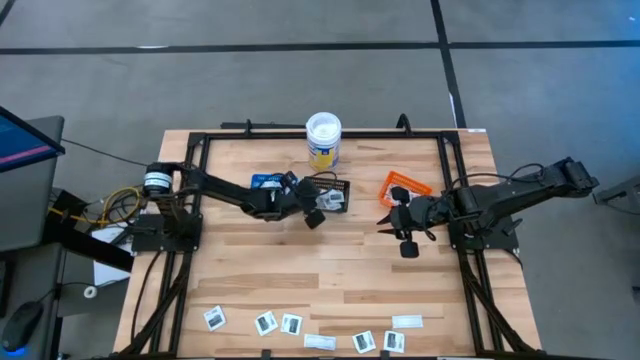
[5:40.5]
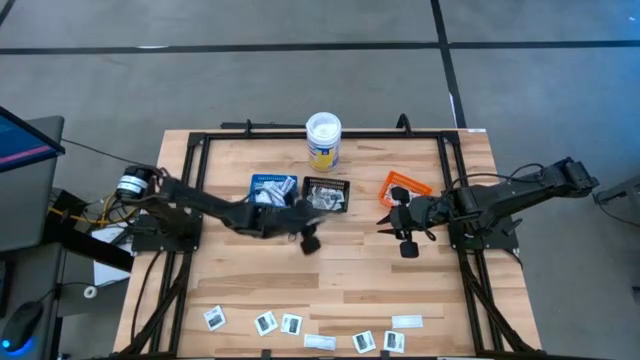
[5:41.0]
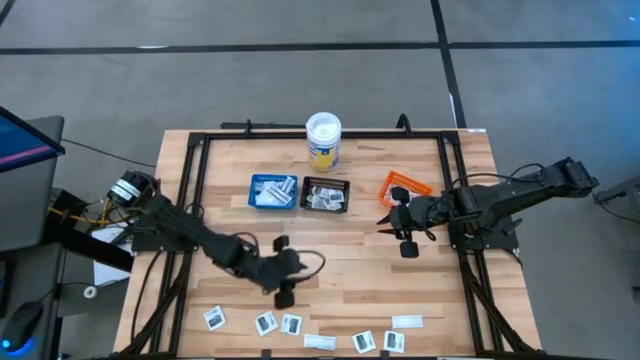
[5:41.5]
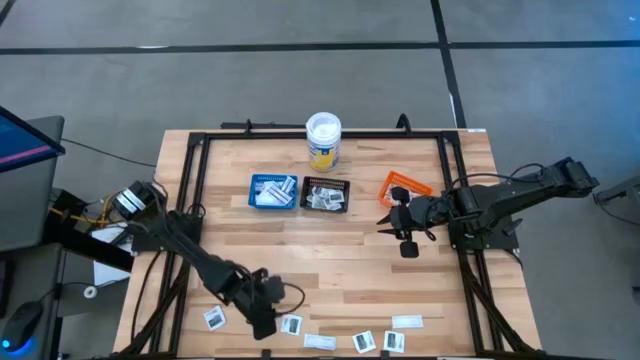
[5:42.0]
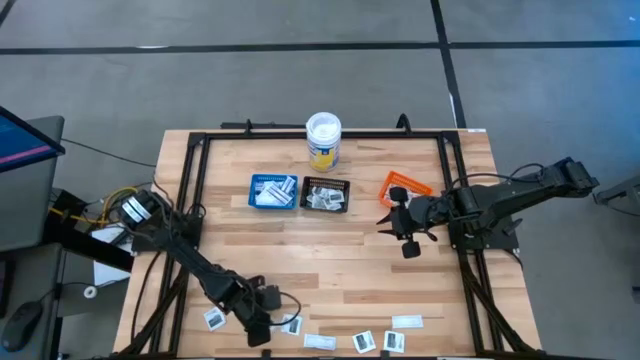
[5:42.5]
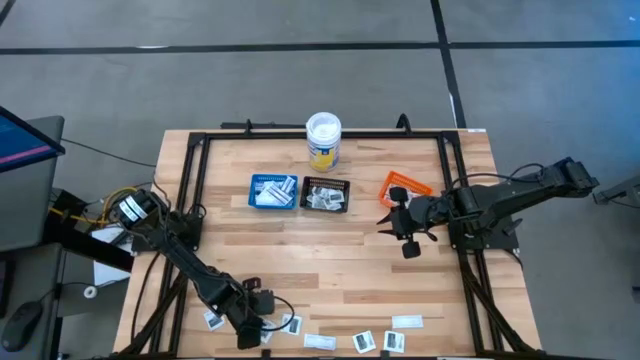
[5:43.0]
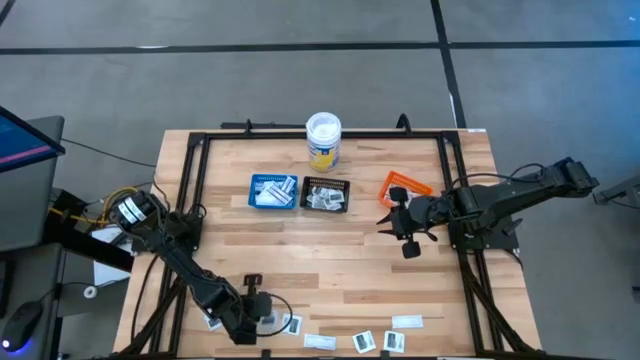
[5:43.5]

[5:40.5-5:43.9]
Task: Pick & Place First Aid Supplies
Put the black towelette pack into the black bin

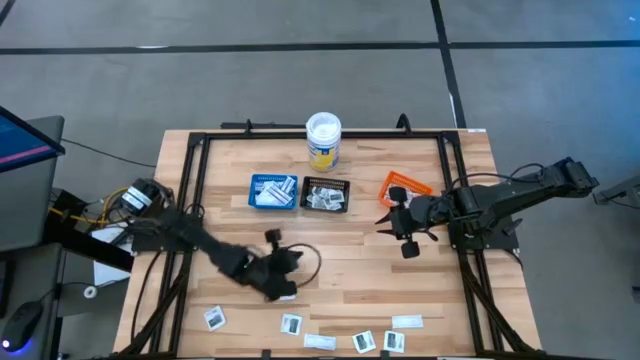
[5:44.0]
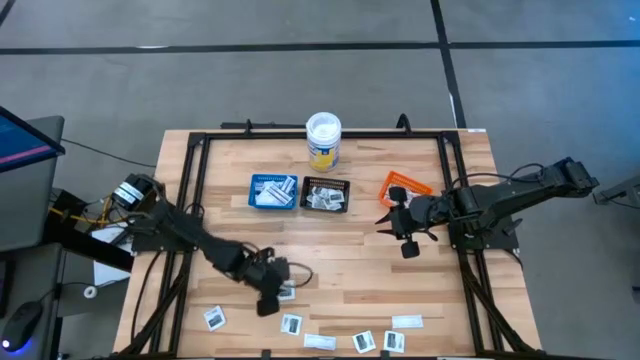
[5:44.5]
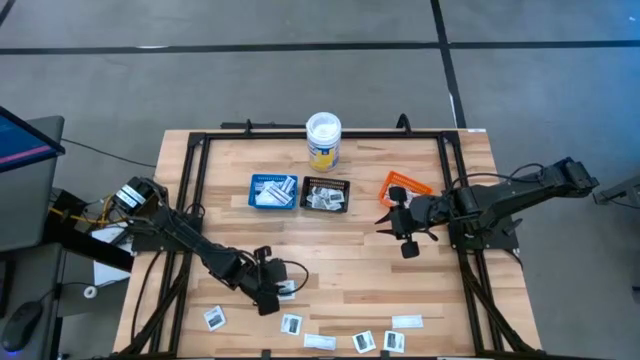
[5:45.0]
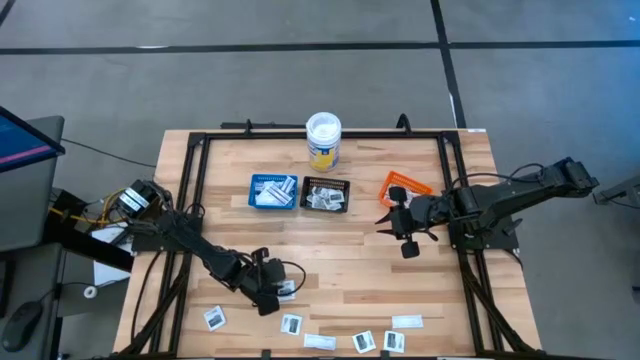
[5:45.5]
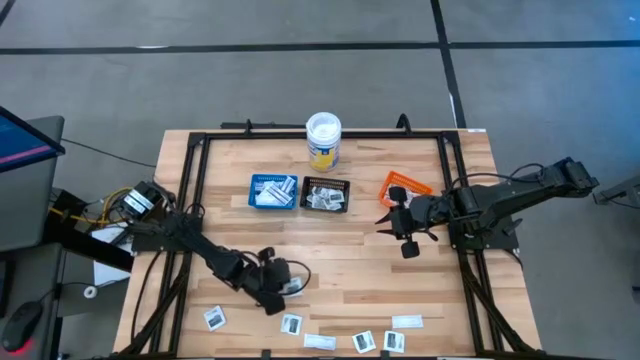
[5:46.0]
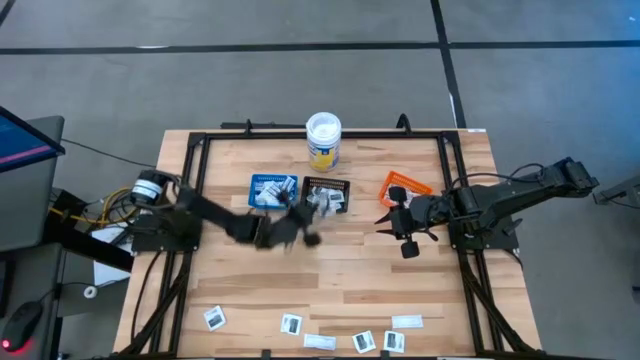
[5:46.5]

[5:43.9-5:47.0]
Put the black towelette pack into the black bin

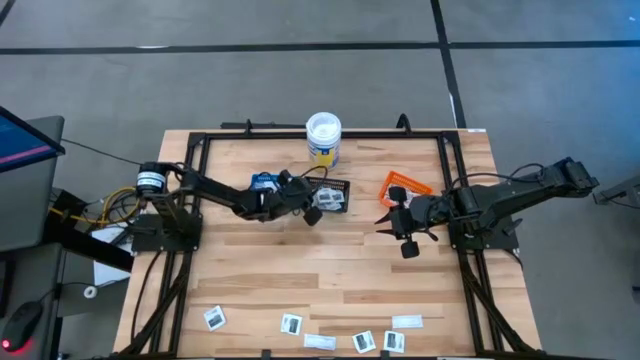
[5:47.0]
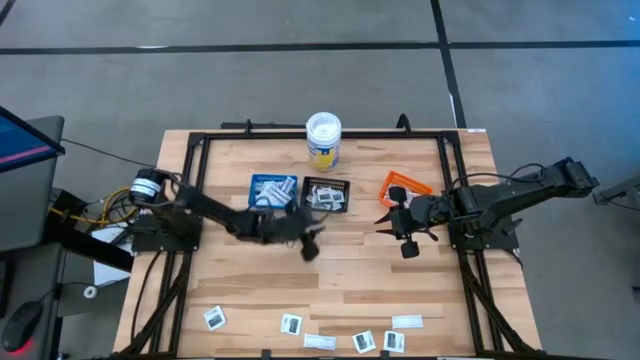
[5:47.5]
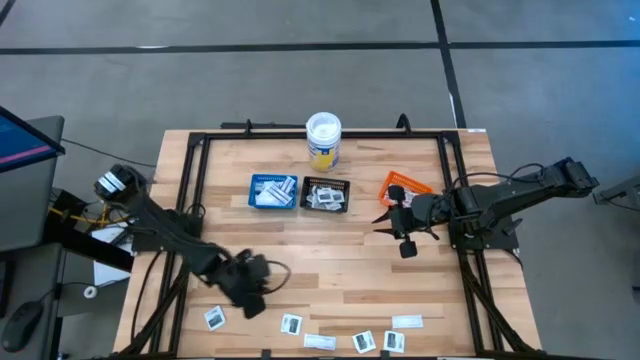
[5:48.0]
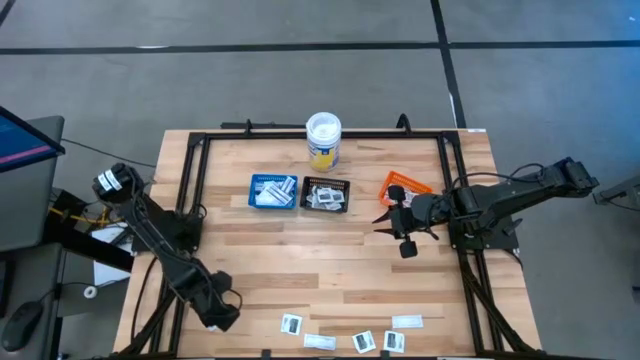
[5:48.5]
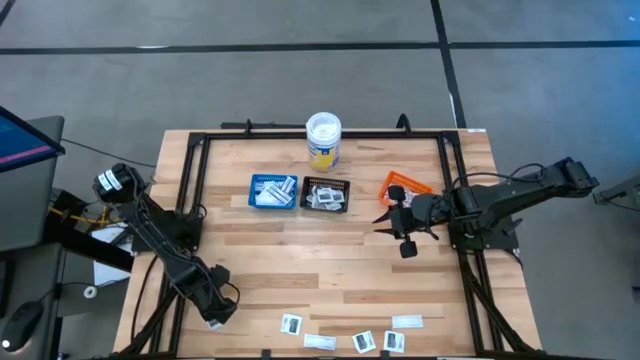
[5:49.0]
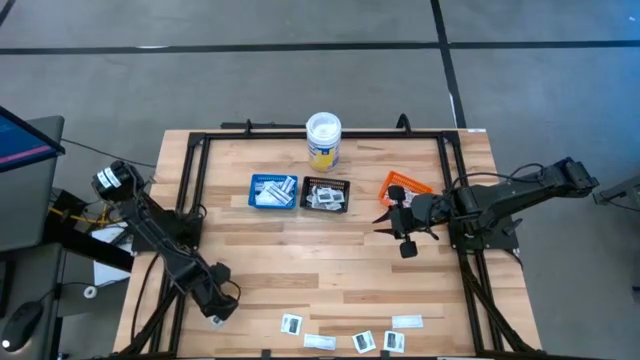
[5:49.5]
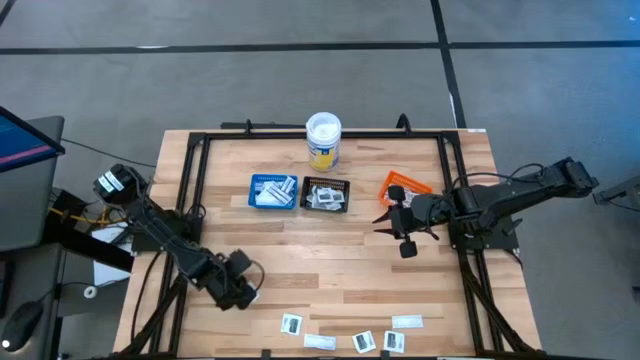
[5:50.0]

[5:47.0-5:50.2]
Put the black towelette pack into the black bin

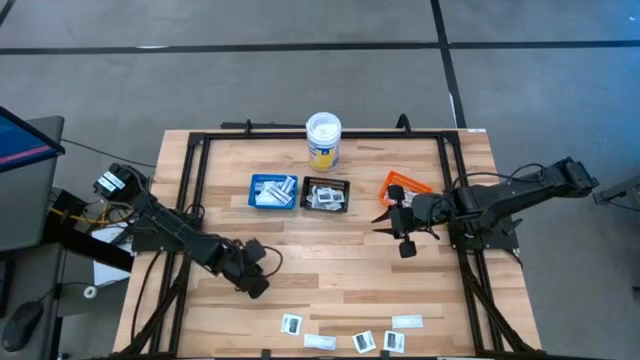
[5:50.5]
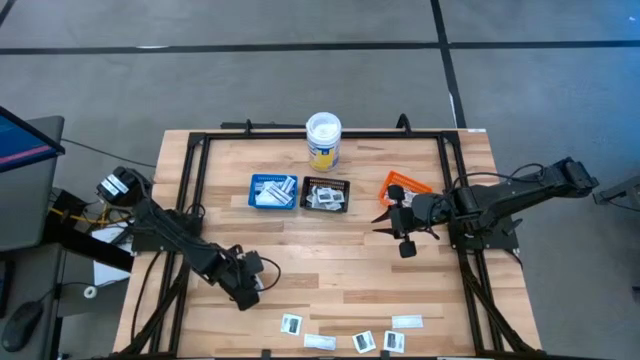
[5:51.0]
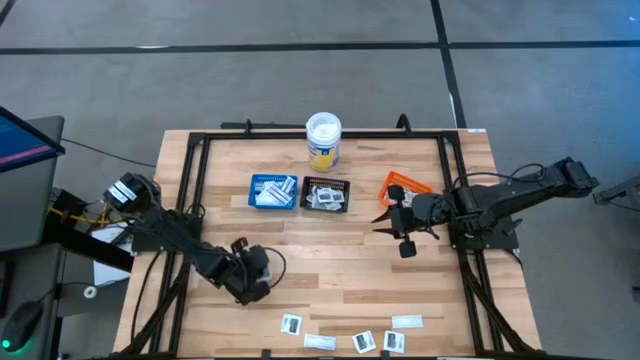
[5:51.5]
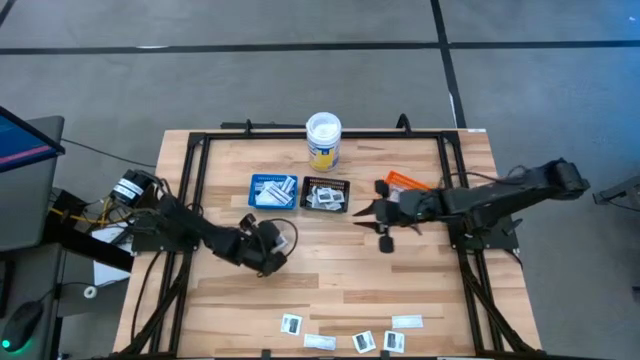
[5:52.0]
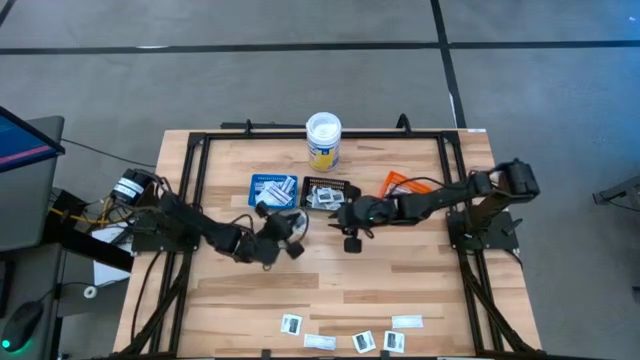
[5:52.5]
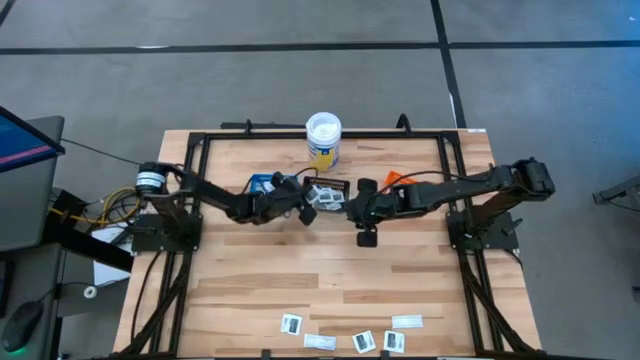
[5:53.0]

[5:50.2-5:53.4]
Put the black towelette pack into the black bin

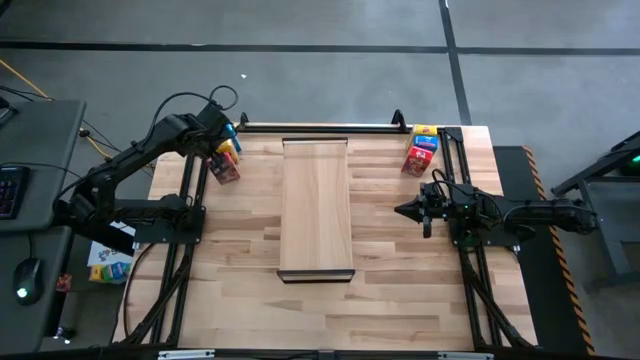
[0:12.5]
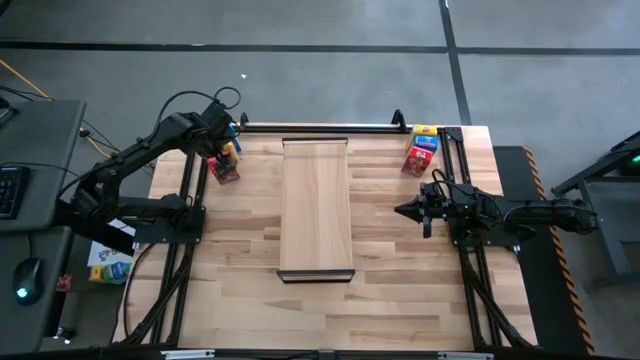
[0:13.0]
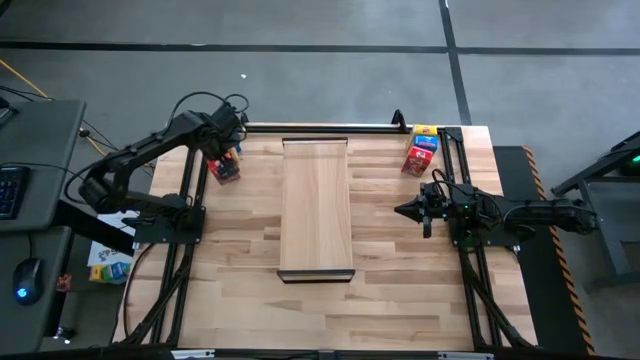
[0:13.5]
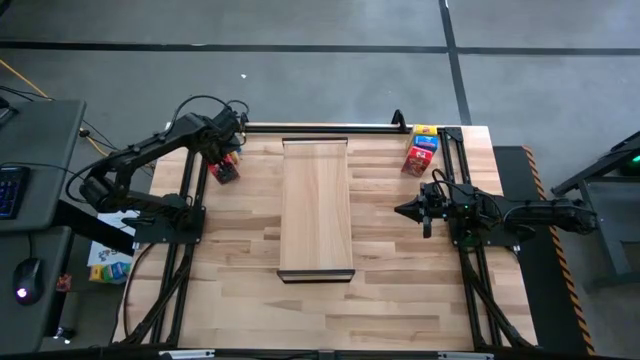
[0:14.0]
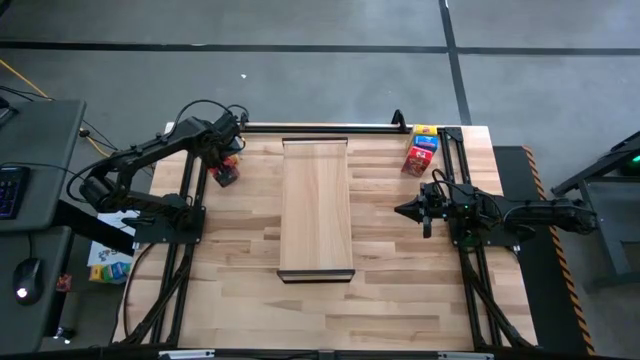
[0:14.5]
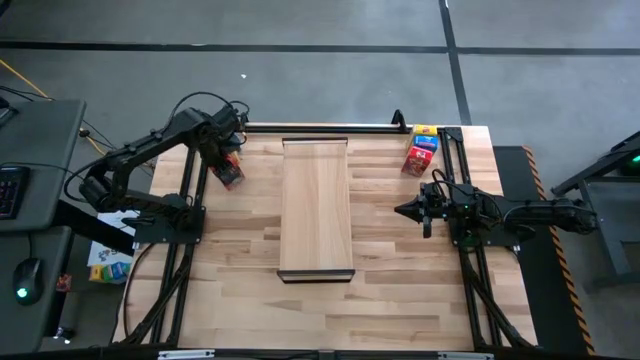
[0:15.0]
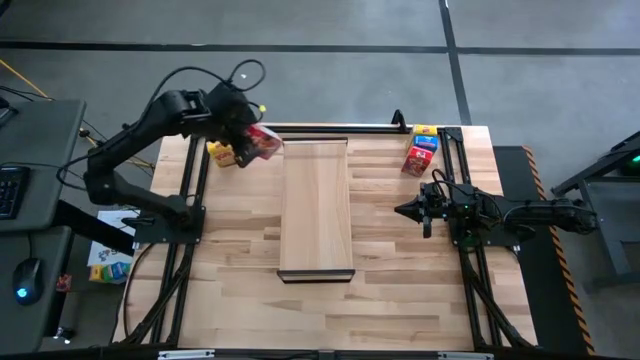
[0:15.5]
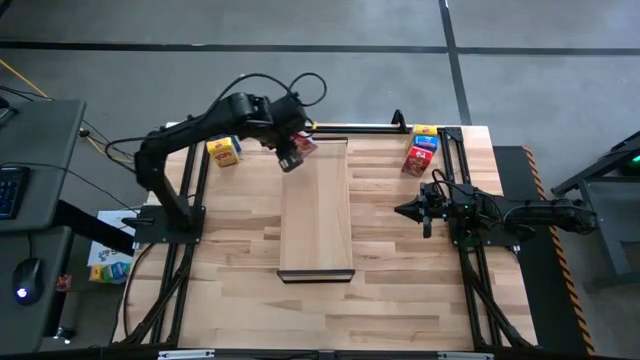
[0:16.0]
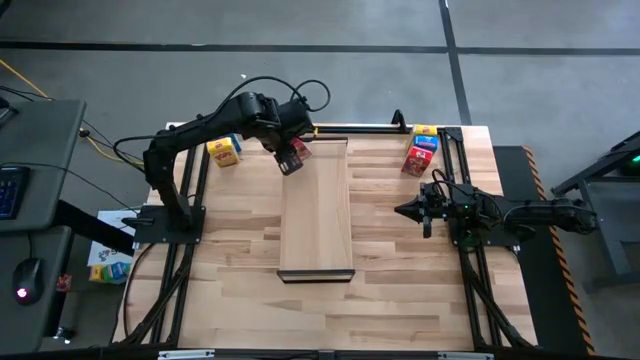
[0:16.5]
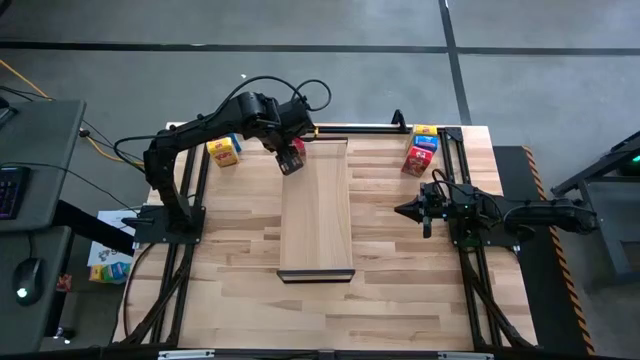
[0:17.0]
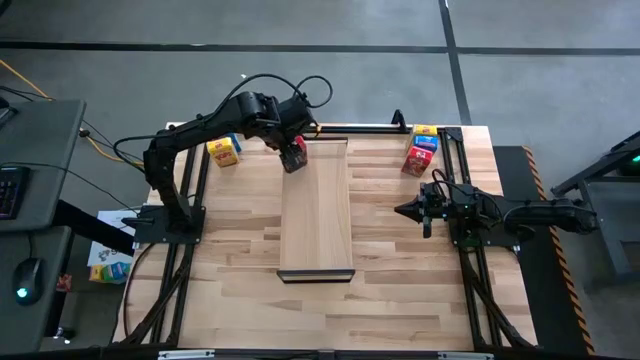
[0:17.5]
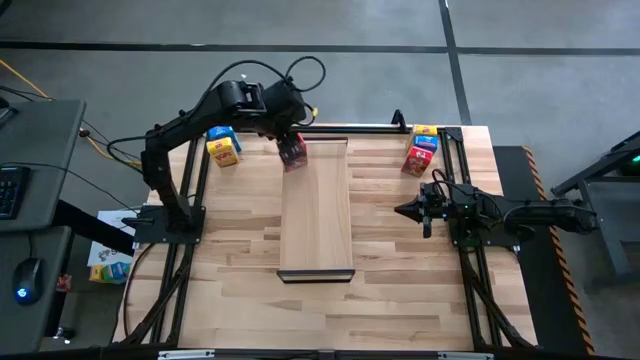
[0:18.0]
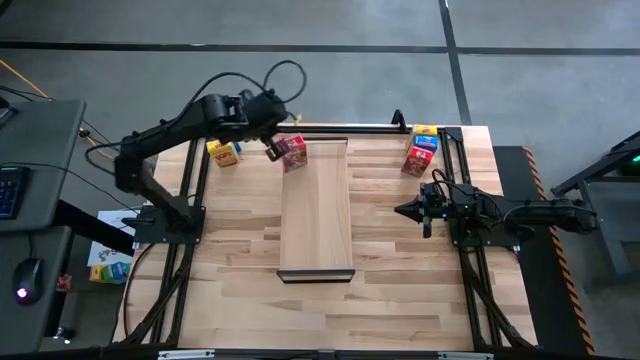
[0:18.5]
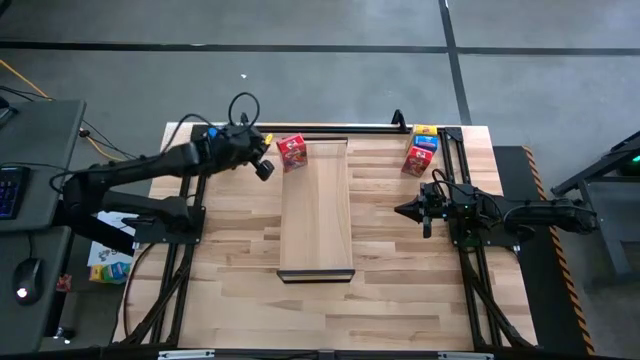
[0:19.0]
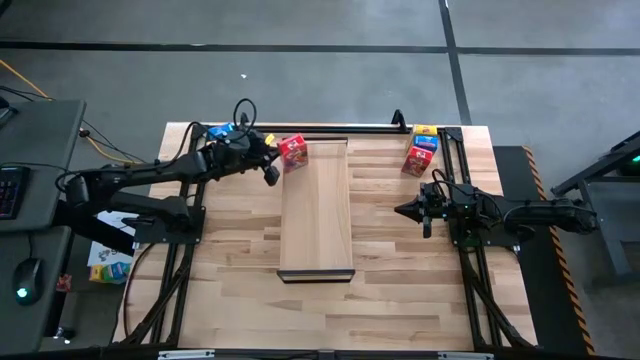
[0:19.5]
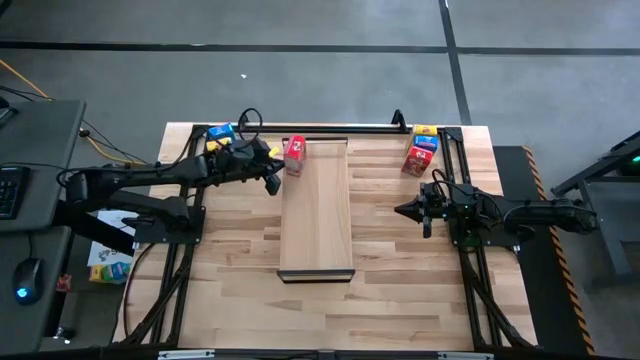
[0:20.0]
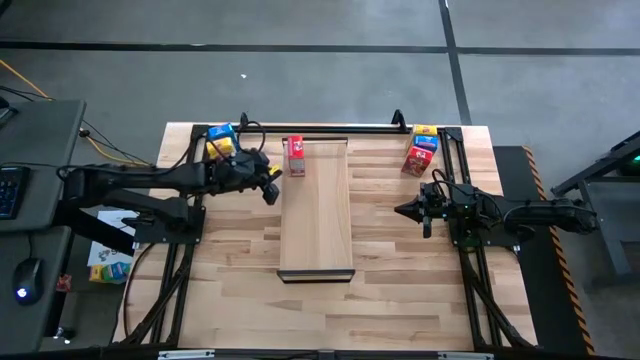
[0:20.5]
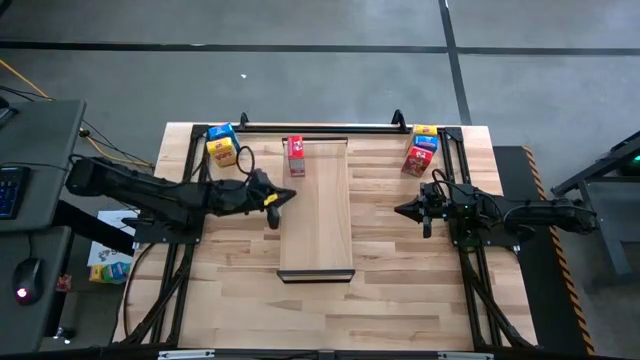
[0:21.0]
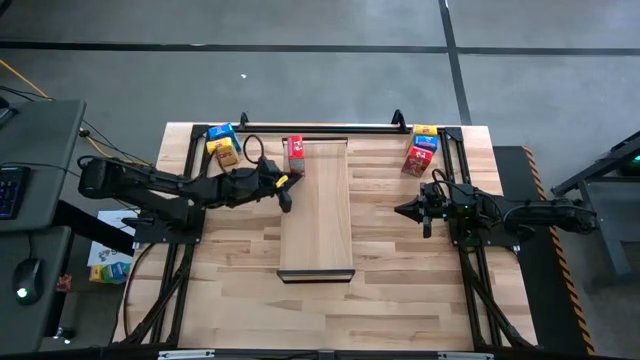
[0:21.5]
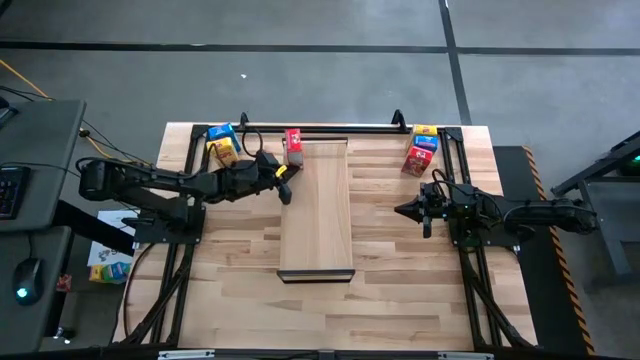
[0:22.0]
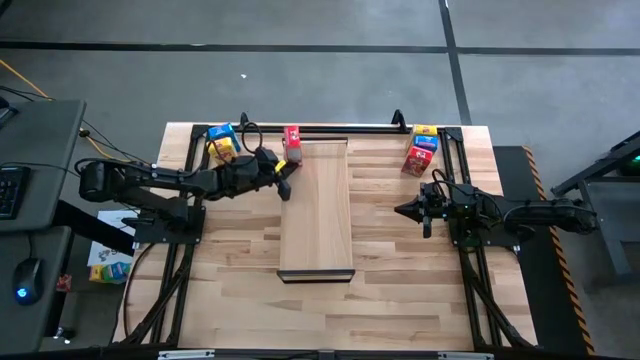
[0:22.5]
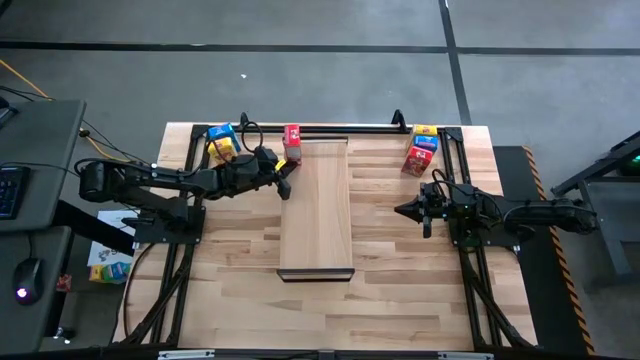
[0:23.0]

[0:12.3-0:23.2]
Task: Stack cereal on shelf
Put the left red cereal box on the shelf
